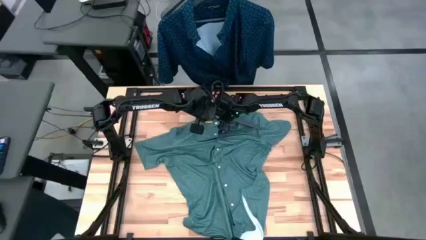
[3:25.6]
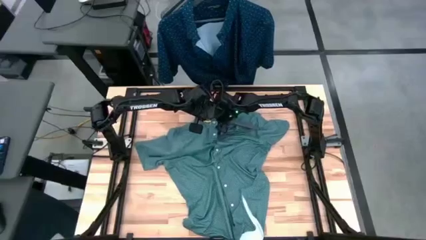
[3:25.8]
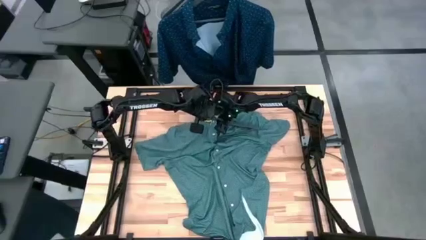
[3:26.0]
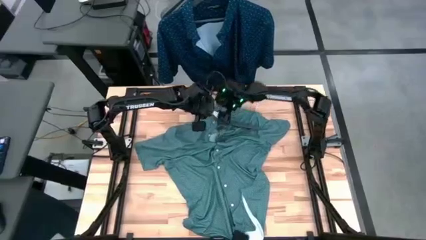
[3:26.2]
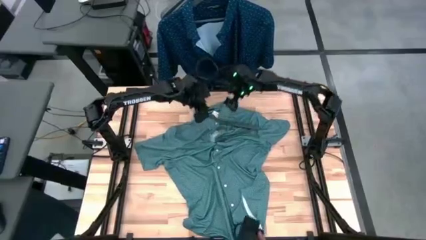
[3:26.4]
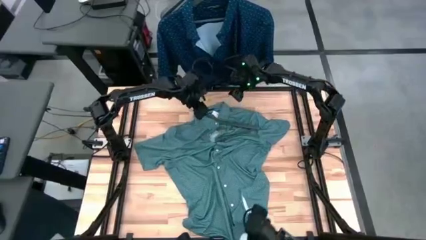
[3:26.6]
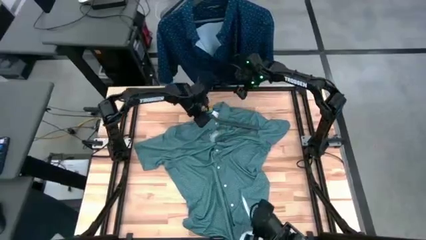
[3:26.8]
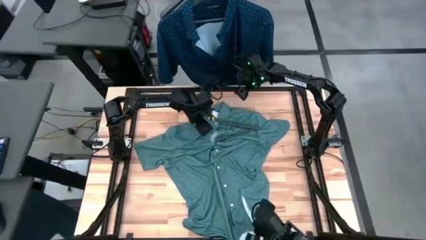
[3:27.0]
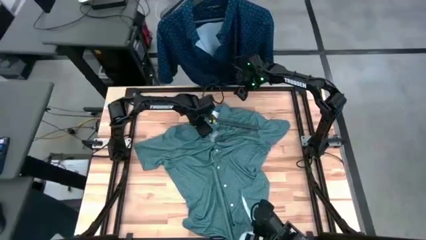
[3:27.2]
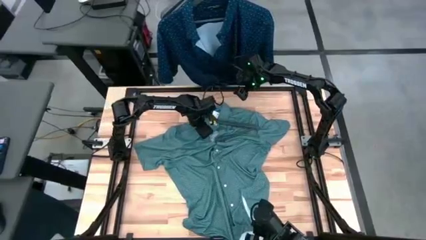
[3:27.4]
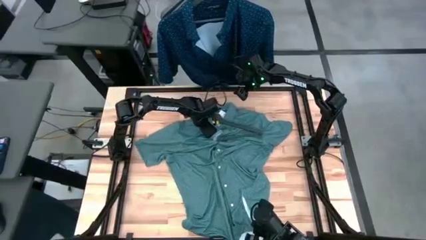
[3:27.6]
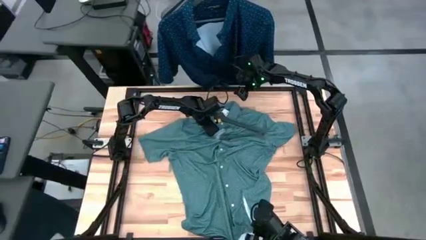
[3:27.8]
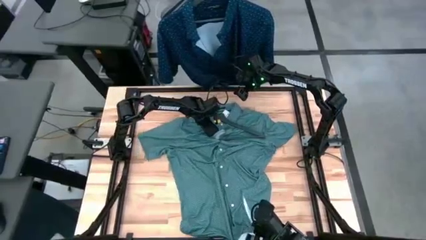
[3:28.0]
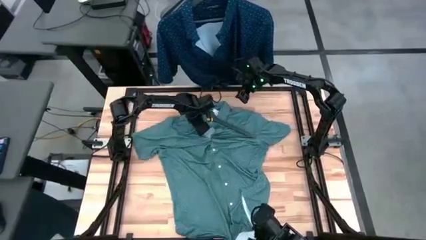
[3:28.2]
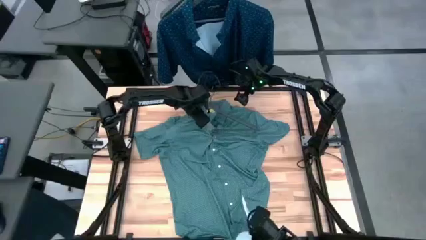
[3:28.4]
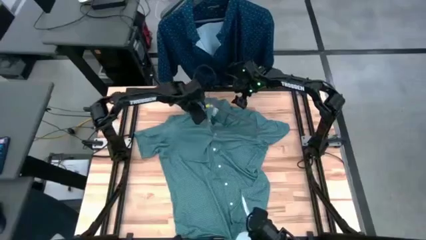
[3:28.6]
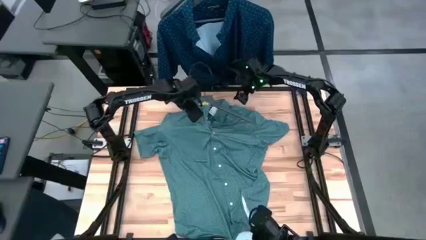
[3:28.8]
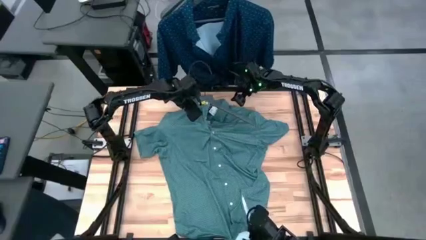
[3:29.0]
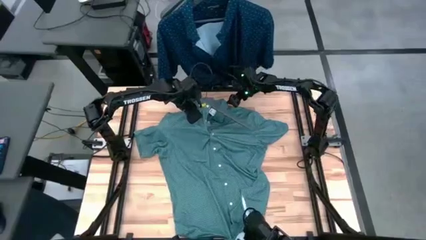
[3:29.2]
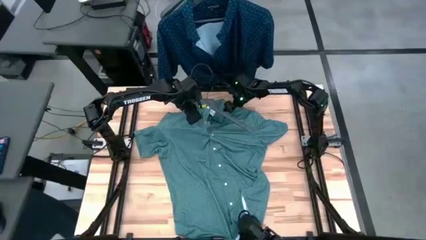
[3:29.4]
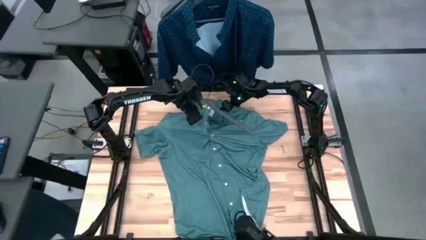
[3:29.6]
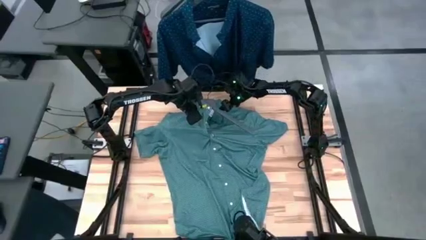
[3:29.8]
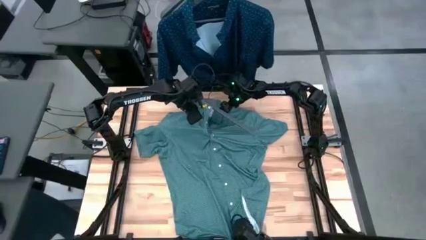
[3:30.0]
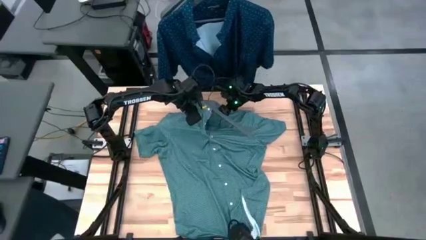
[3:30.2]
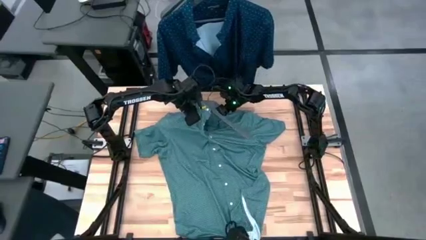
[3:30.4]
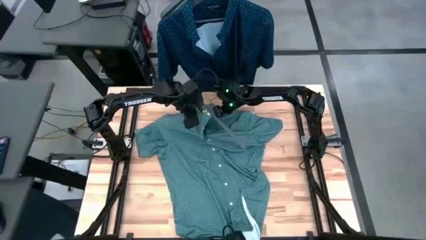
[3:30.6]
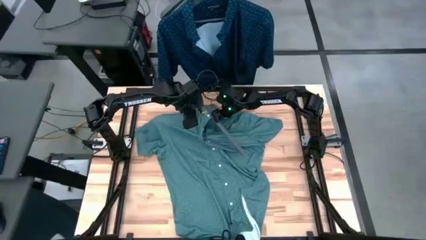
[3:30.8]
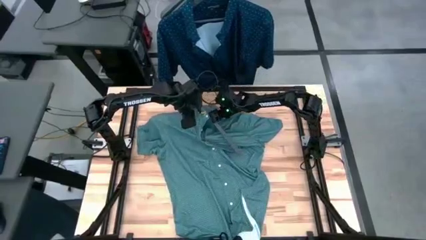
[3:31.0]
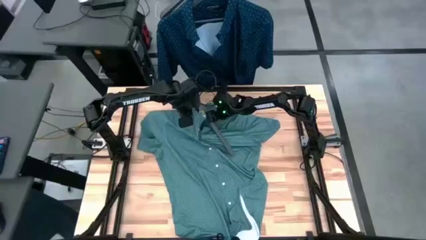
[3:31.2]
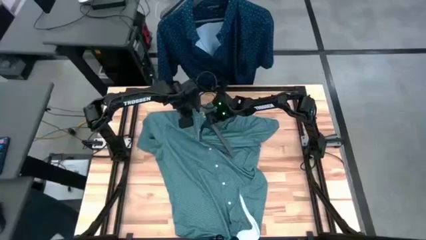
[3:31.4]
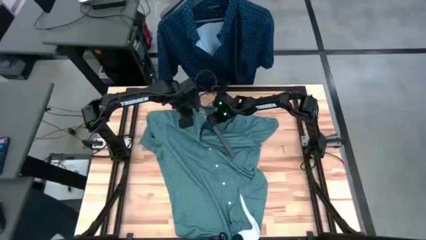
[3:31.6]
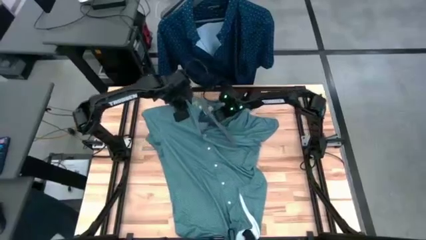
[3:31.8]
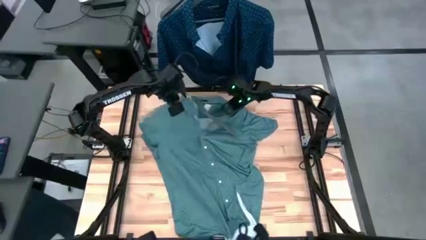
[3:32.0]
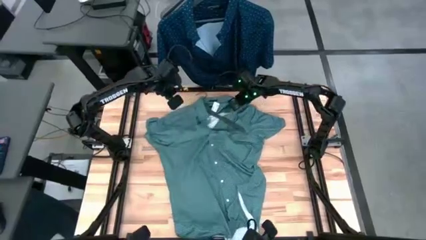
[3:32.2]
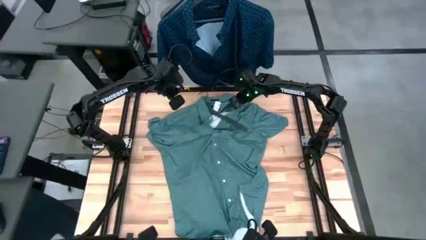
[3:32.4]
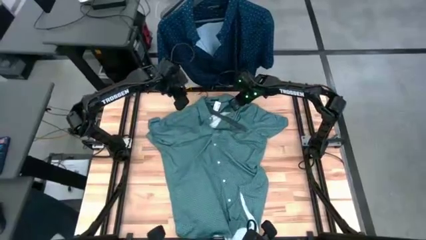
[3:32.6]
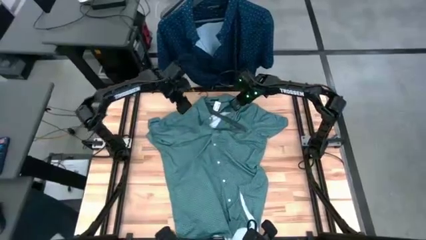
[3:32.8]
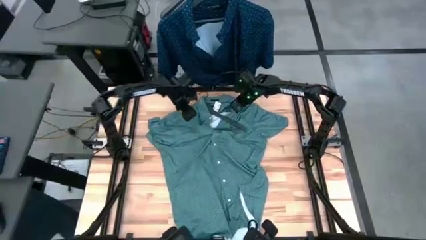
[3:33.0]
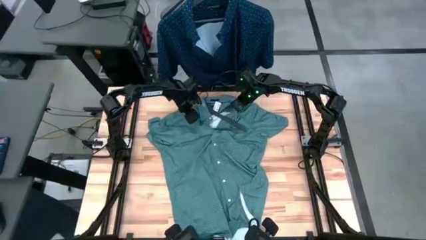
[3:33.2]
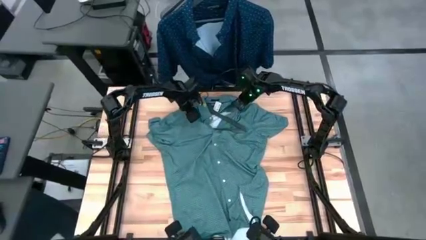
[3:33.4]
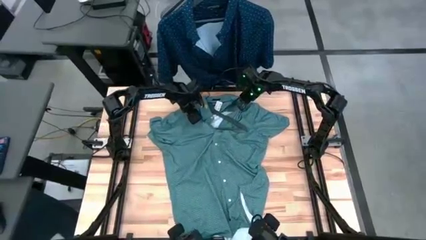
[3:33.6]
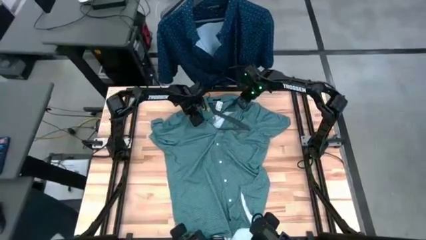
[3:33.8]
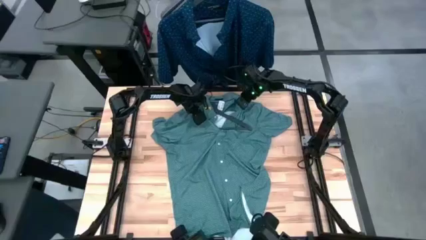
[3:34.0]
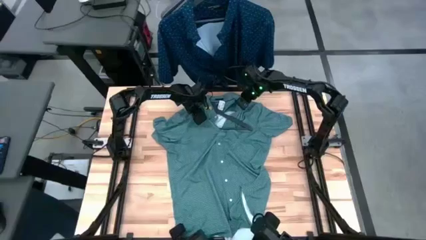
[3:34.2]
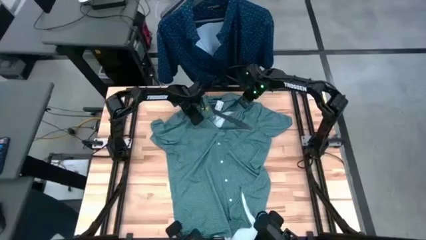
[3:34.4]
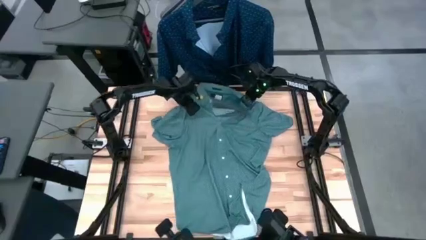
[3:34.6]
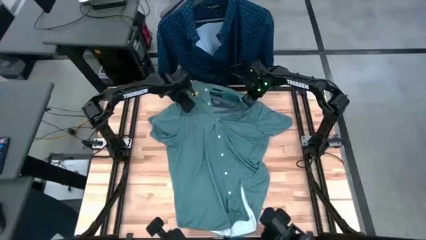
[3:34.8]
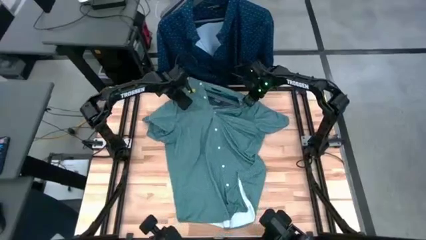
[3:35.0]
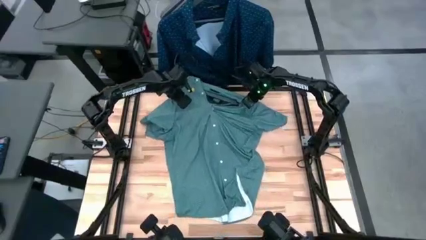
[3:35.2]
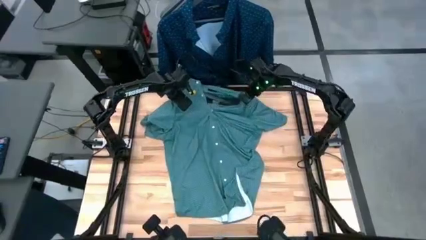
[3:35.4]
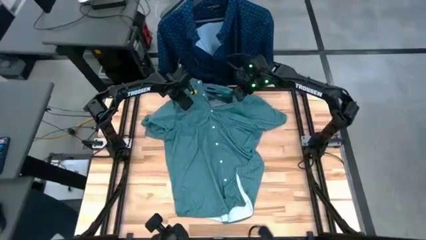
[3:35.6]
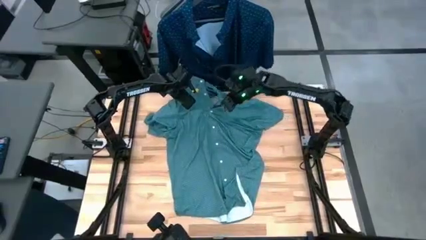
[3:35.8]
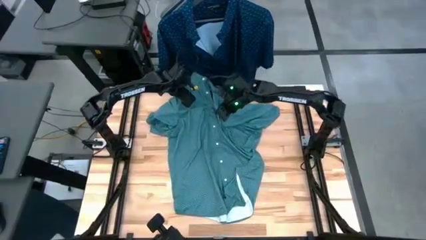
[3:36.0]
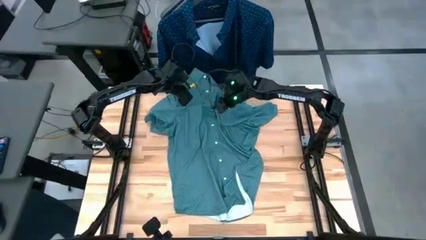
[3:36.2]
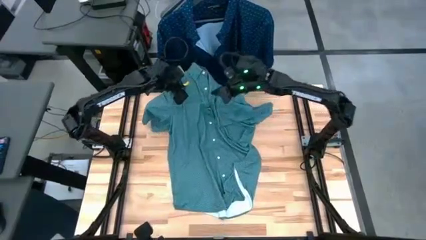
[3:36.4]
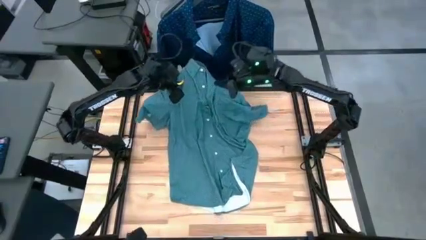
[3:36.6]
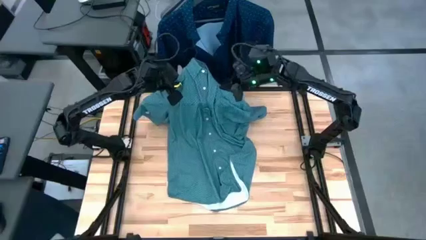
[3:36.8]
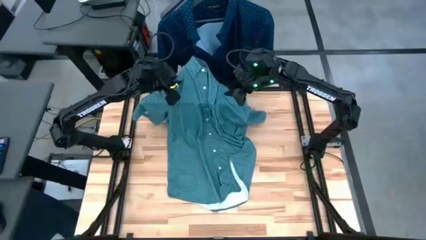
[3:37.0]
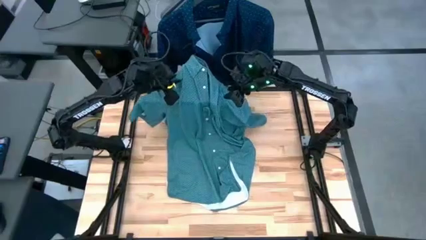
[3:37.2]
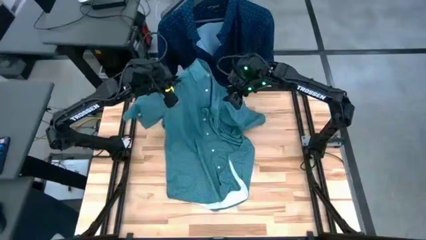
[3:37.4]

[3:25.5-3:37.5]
Task: Hang clothes
Hang the green polo shirt on the rack

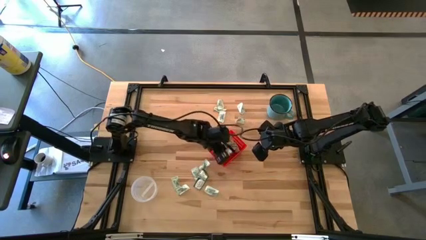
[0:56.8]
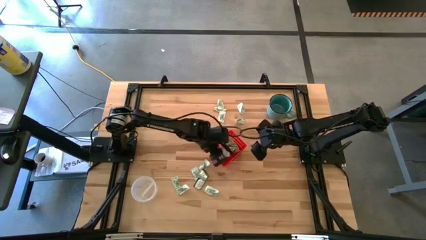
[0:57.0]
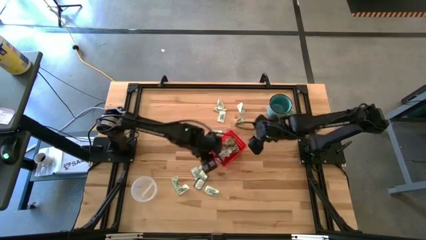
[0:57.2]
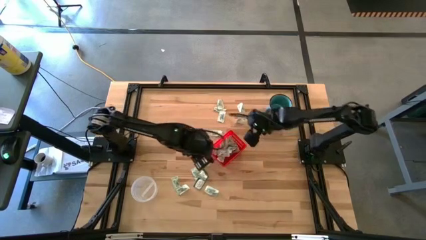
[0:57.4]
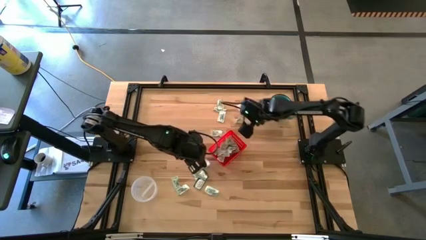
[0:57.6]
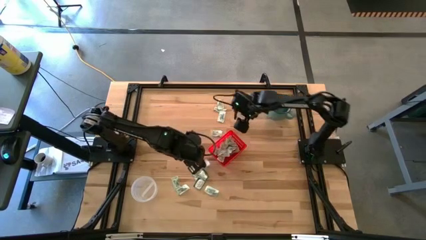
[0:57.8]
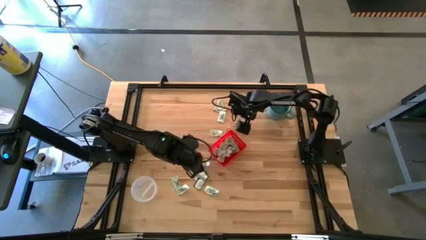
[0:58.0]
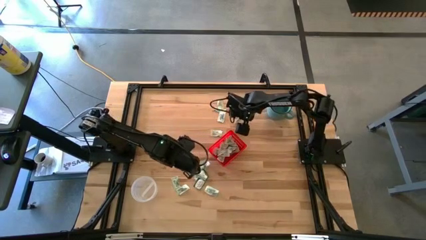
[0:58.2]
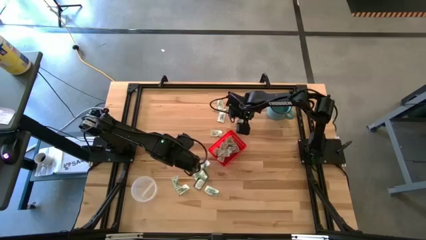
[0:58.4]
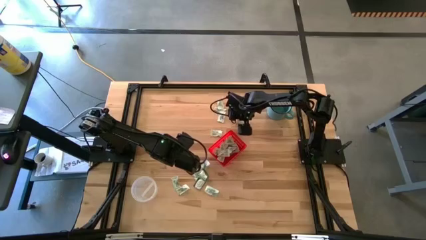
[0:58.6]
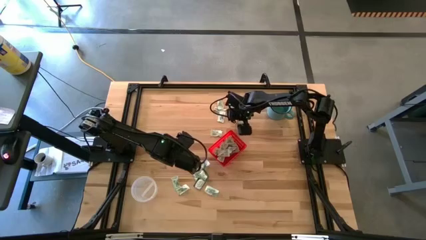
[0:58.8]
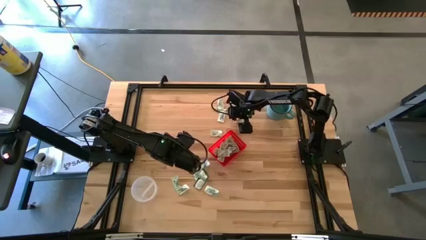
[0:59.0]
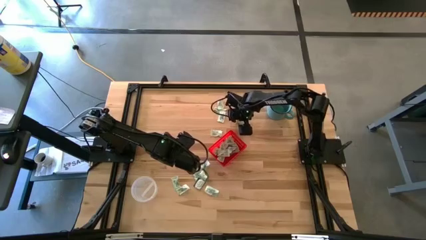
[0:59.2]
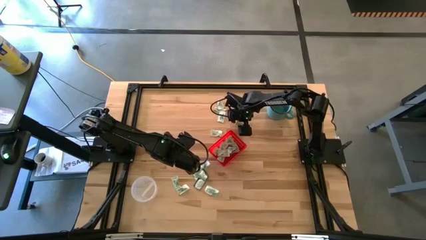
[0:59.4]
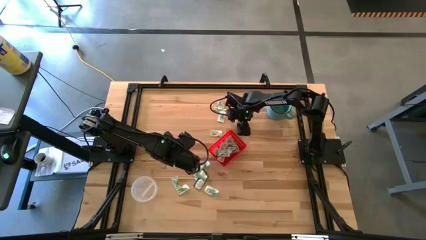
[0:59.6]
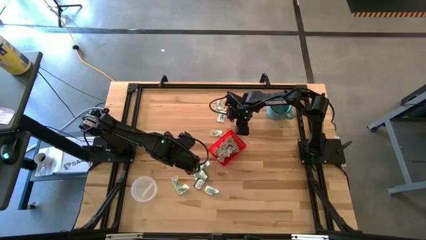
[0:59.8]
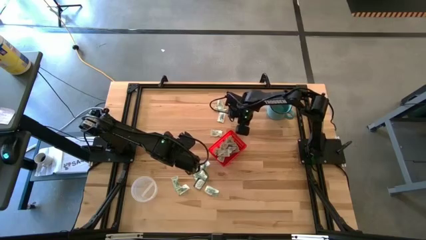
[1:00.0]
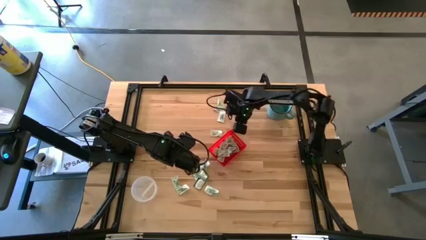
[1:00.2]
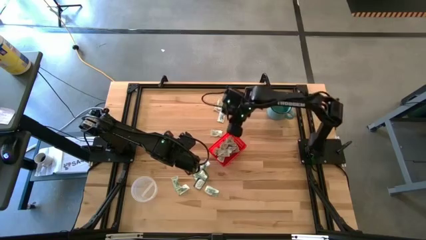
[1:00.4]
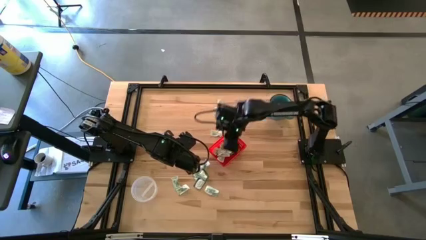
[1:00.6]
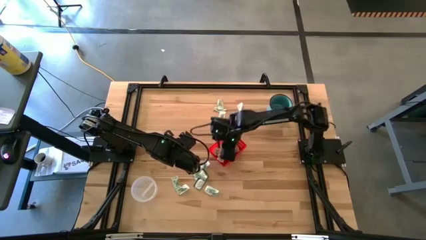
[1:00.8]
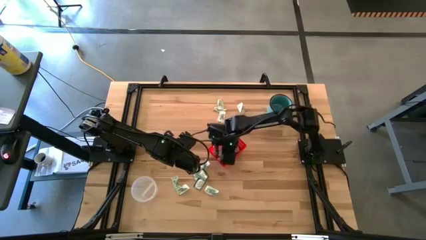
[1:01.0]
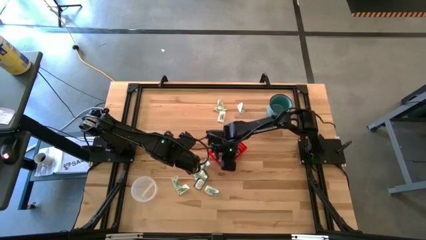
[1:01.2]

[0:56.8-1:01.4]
Task: Pick and place items into bin
Put the white stevia pack into the red bin
